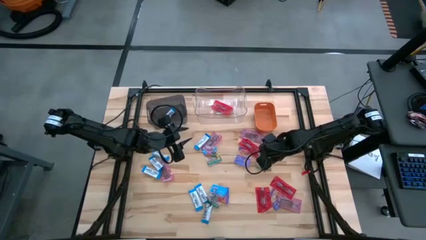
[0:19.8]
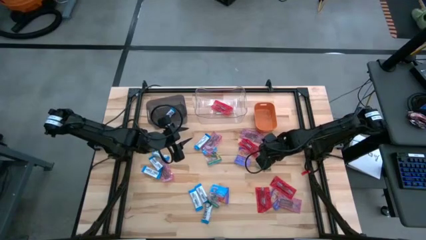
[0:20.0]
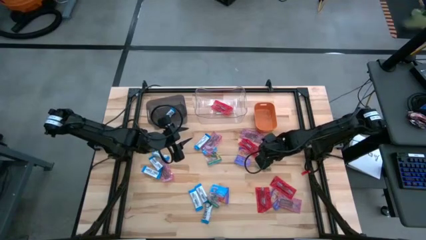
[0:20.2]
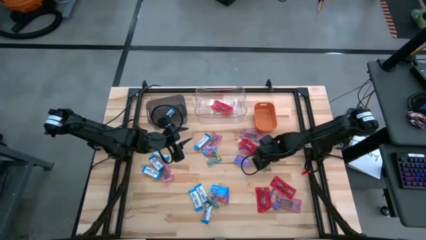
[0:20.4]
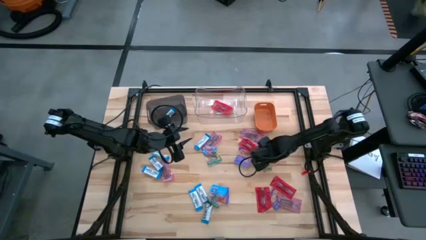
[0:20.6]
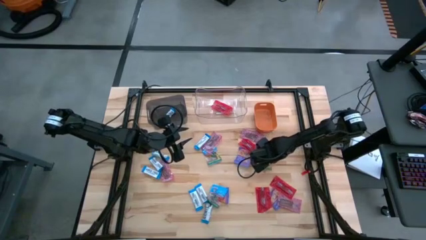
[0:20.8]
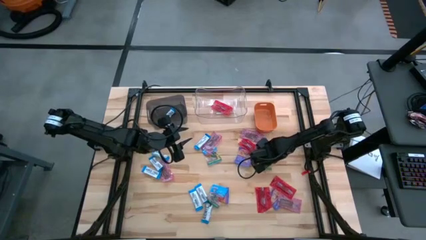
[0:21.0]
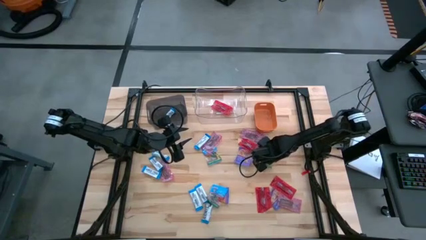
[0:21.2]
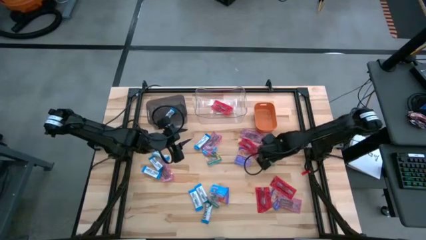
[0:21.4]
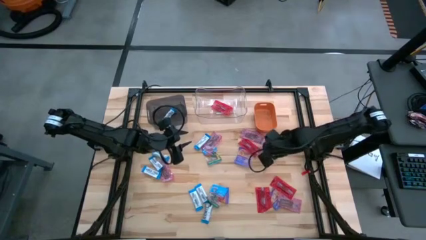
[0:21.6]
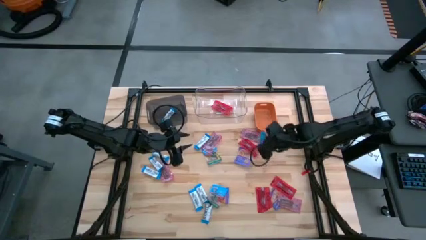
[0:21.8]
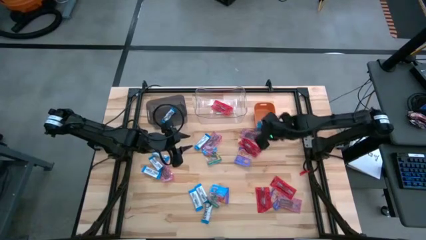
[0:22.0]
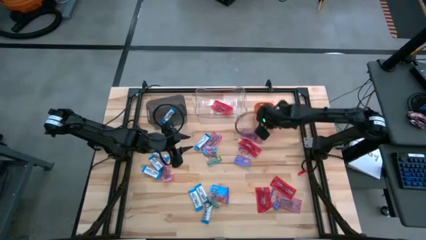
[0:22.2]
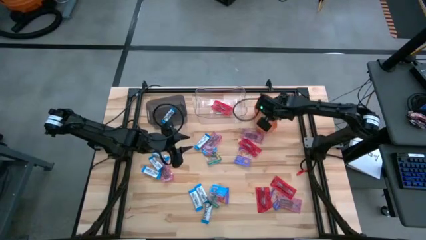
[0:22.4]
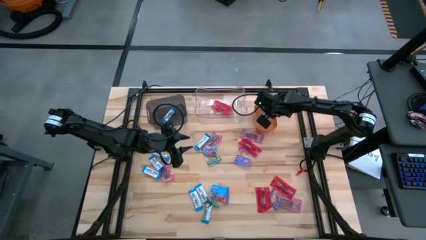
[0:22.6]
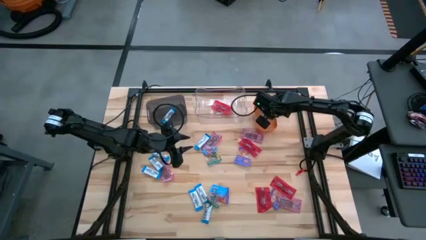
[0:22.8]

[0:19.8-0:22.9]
Task: Sort candy
Put the blue gummy into the orange bin

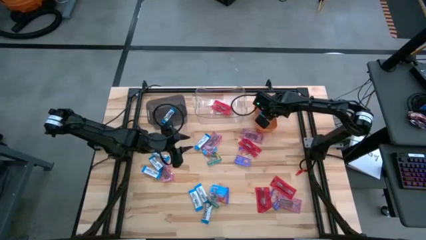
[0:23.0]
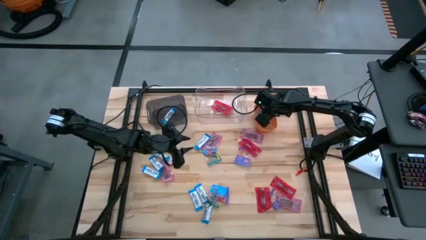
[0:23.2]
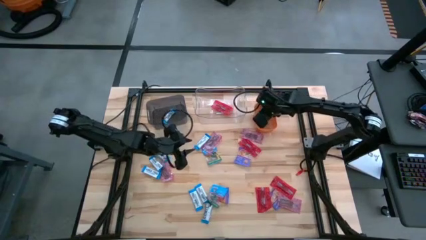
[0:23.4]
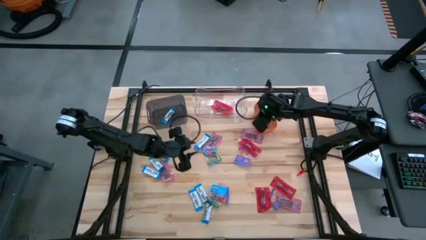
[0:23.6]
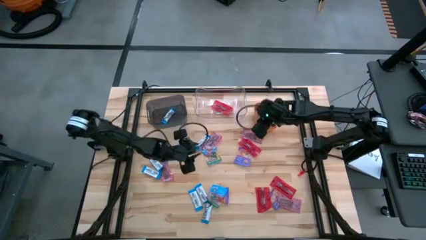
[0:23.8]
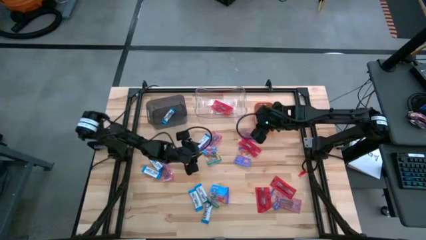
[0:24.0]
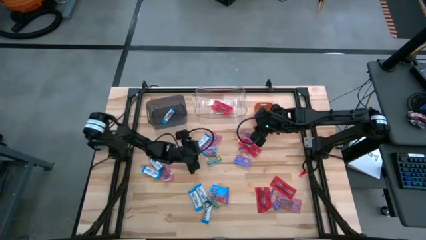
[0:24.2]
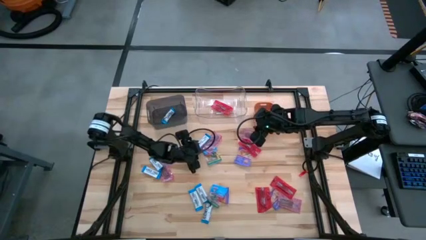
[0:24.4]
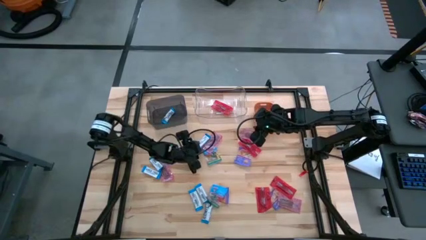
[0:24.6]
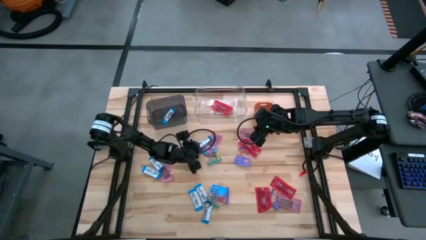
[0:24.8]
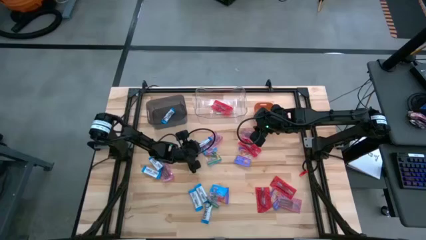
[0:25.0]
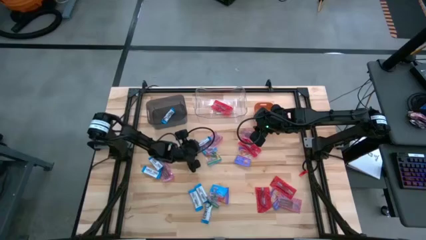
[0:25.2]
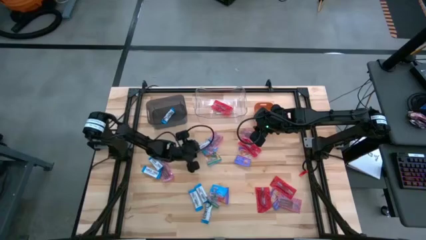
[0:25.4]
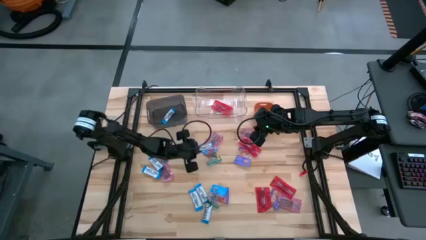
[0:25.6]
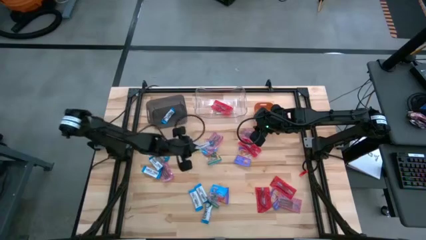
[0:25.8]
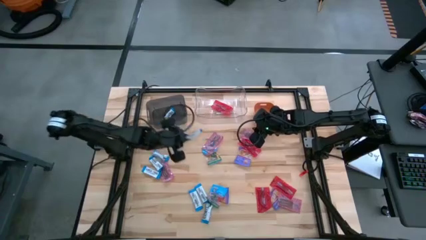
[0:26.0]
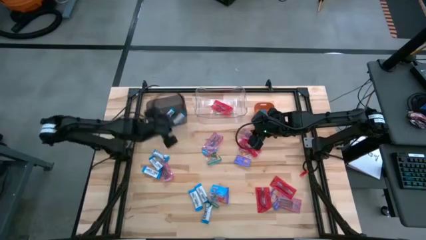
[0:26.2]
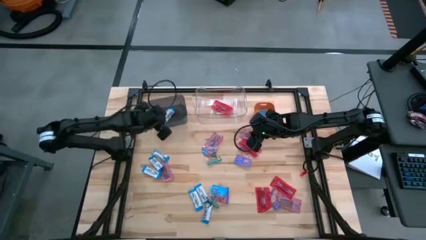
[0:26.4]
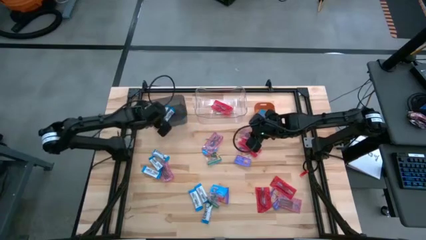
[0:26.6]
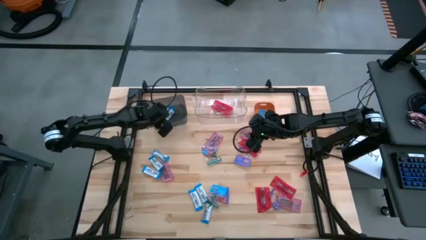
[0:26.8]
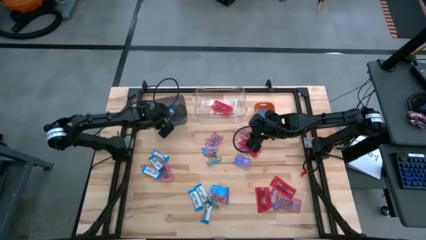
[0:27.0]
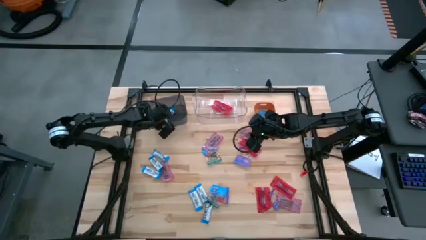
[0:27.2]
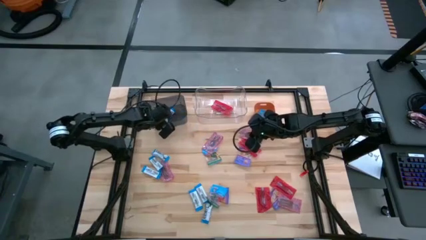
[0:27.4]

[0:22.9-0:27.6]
Put the white chocolate into the black bin

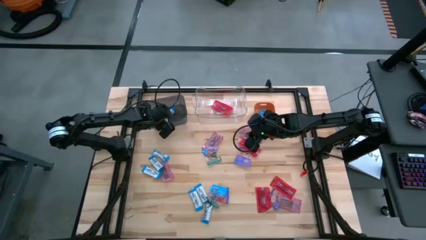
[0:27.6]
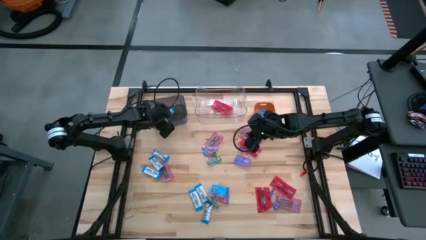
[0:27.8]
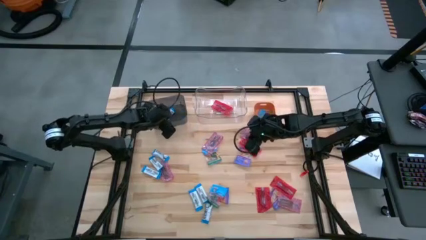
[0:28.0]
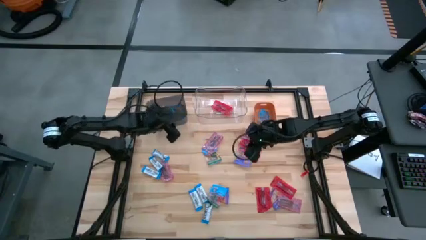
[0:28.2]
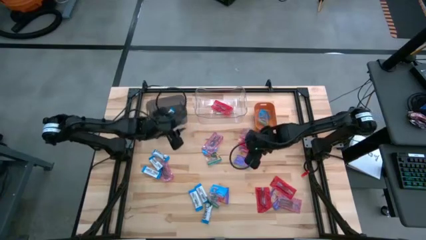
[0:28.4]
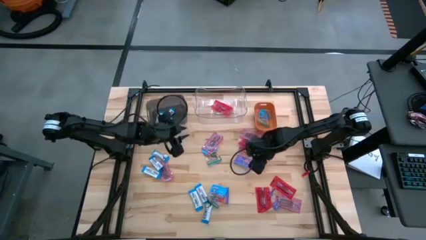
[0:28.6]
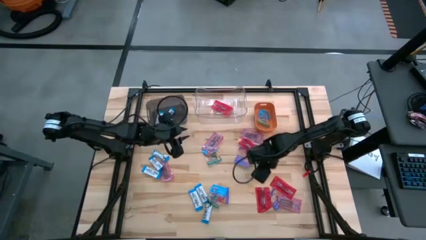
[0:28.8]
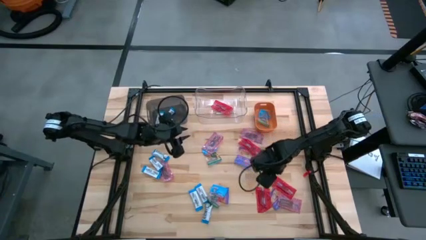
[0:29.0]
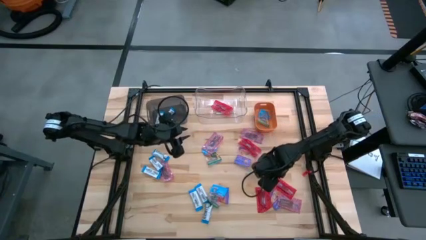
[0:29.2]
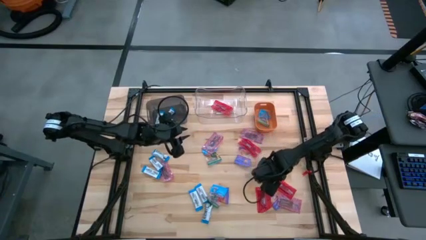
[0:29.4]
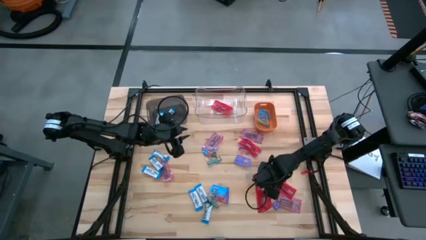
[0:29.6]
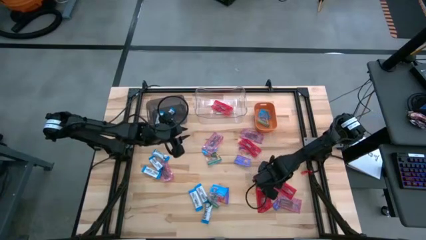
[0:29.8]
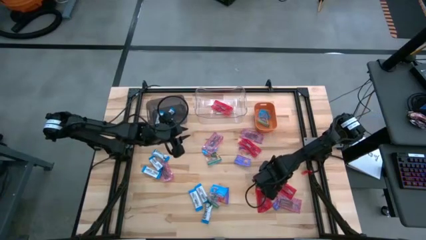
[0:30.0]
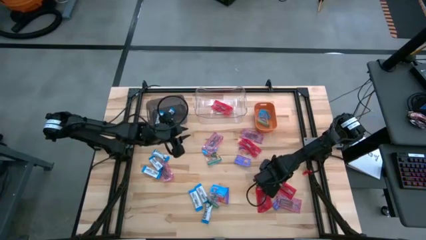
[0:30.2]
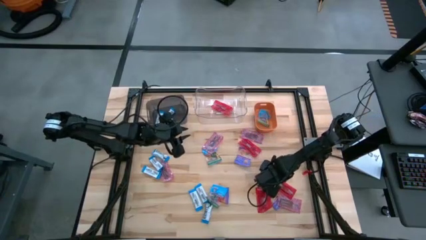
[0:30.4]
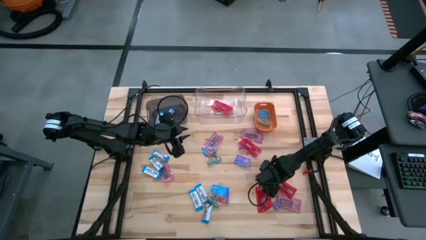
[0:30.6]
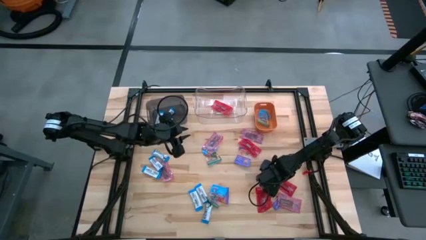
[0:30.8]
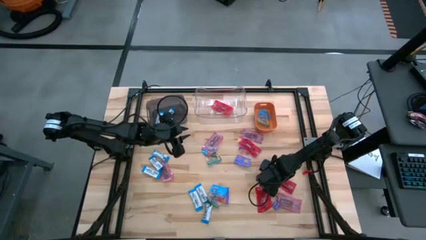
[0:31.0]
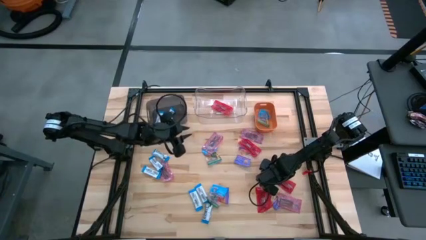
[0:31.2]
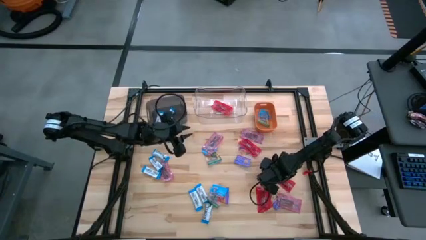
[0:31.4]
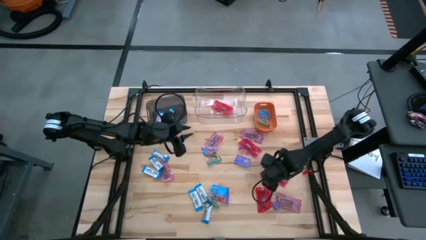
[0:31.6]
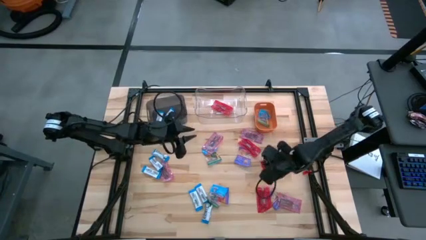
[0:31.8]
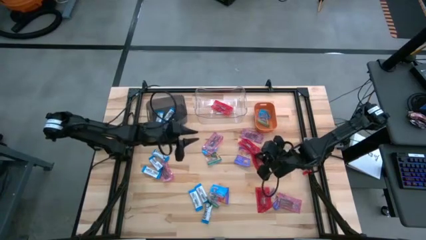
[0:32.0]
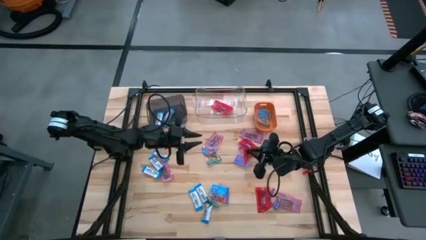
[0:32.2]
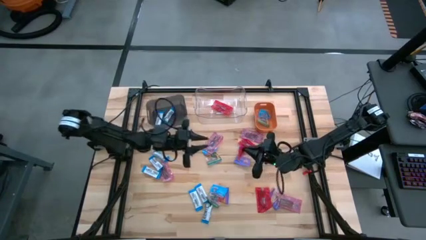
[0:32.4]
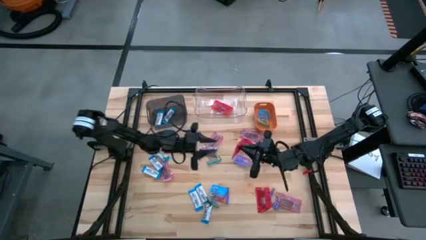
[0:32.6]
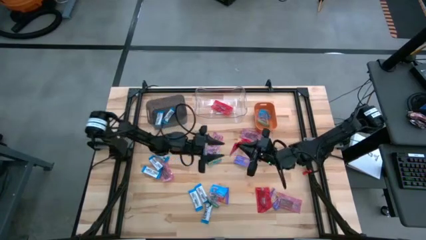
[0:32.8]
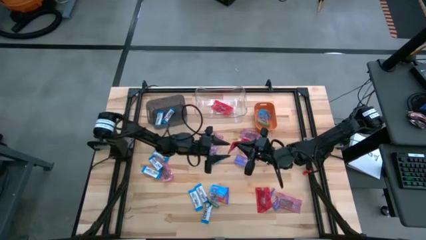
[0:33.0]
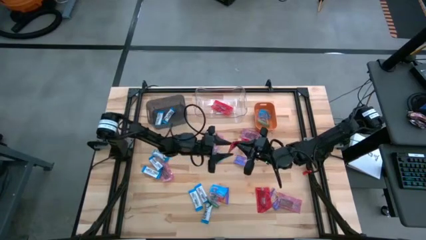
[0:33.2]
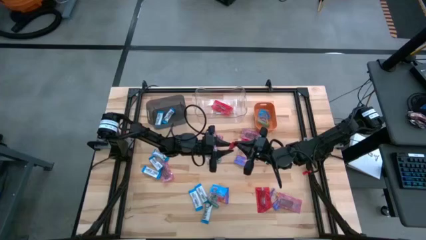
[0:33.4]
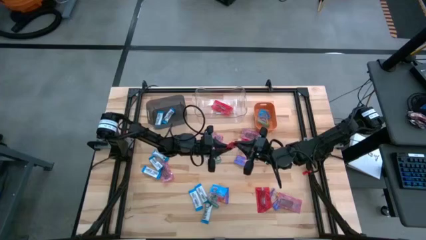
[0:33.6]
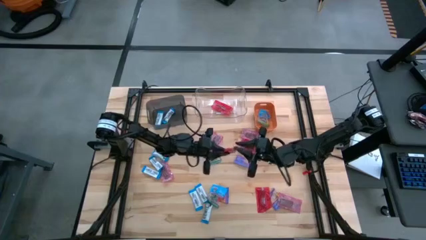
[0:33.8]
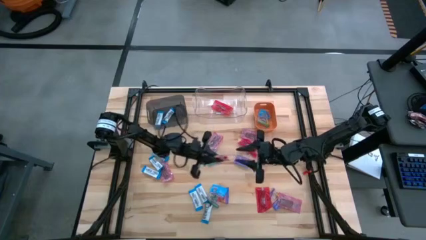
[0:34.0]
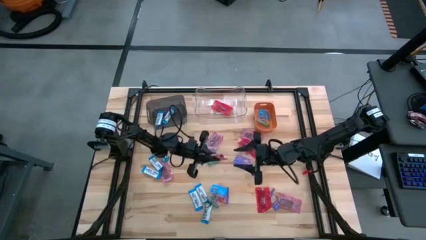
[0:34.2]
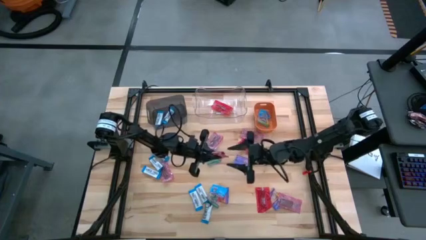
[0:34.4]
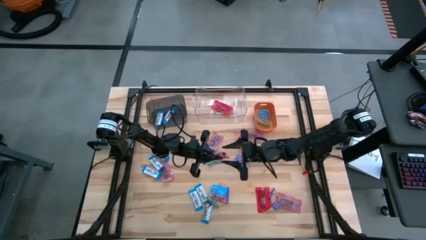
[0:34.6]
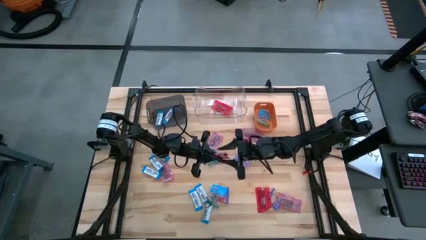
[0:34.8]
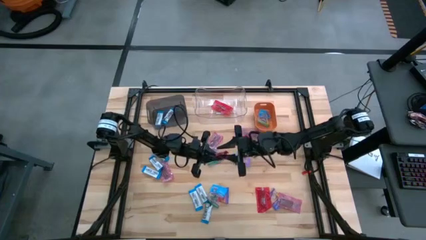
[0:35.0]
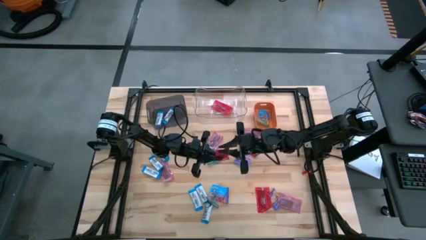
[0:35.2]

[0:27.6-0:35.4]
Put the red chocolate into the transparent bin

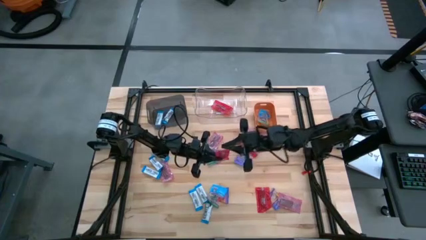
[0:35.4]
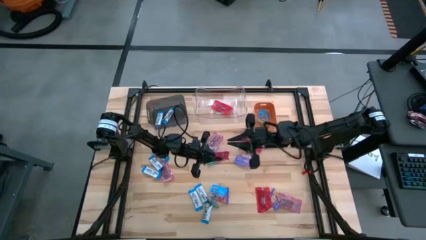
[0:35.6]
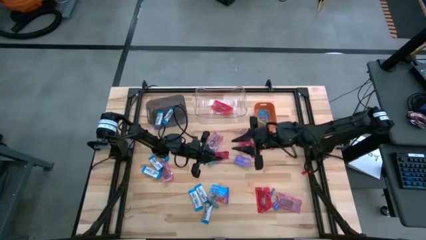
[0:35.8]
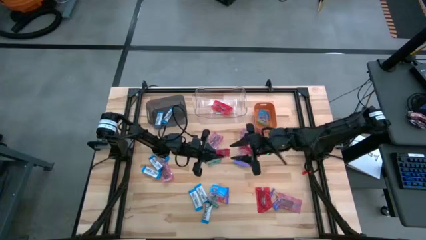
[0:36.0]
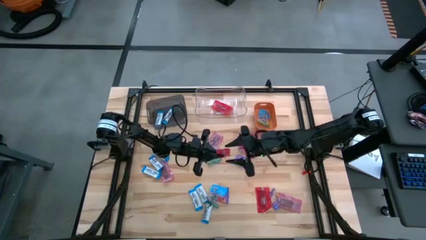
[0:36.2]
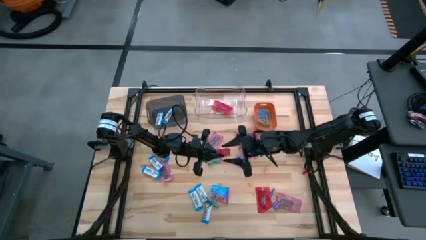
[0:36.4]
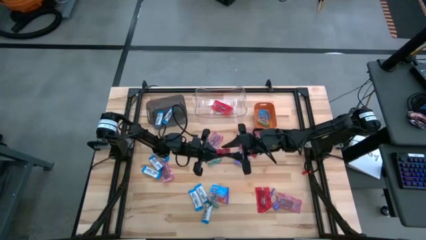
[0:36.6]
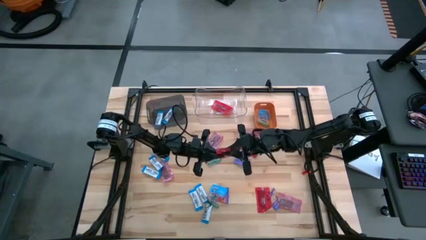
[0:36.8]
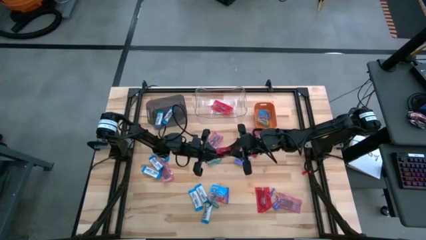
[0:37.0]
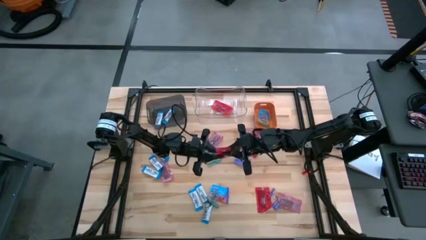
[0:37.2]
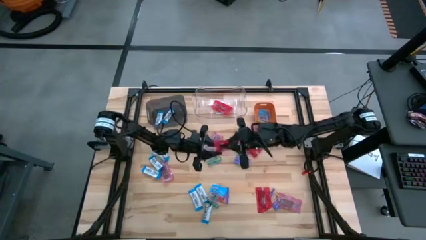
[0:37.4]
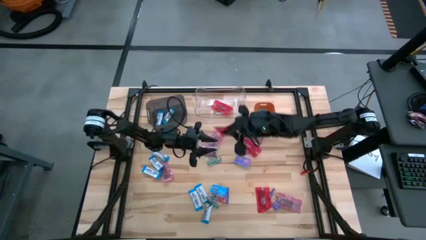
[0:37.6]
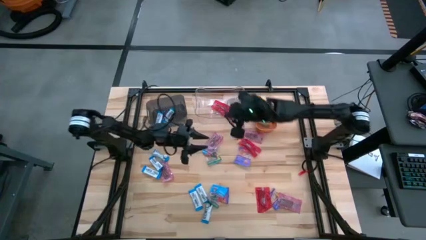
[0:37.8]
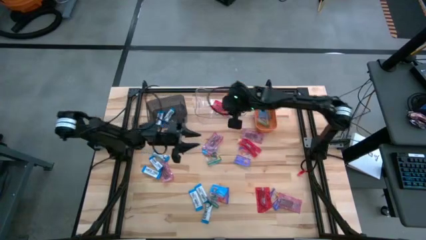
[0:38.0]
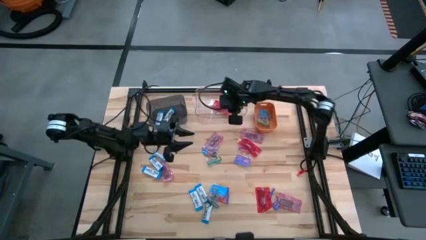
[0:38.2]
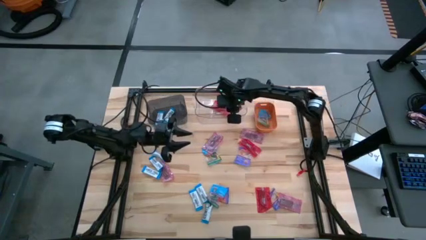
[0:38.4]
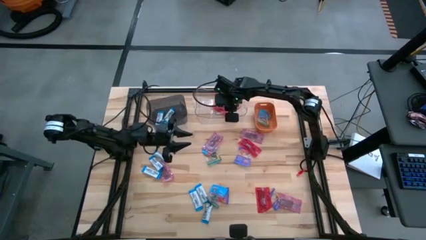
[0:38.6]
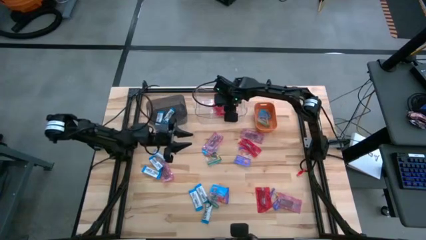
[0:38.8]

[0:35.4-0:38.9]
Put the red chocolate into the transparent bin
